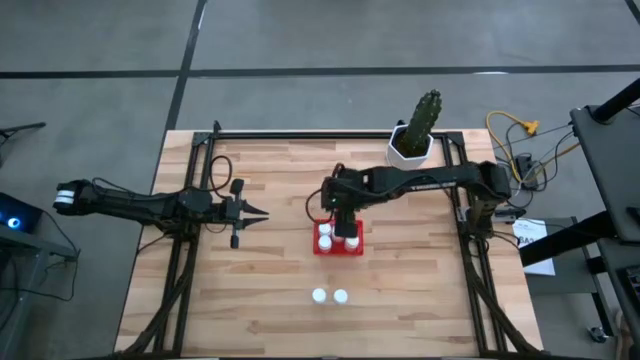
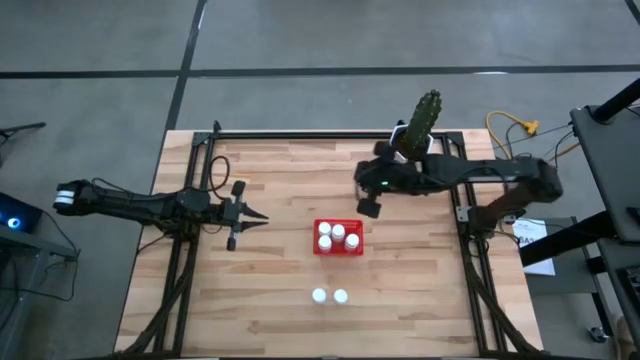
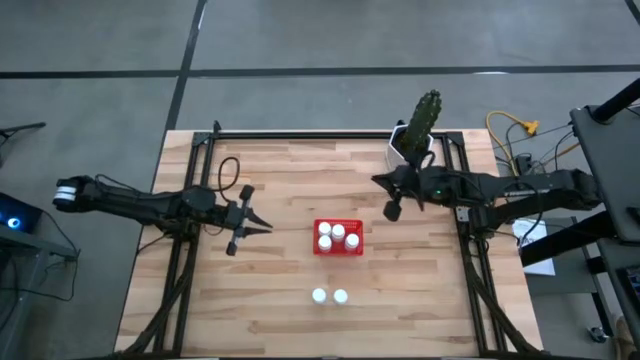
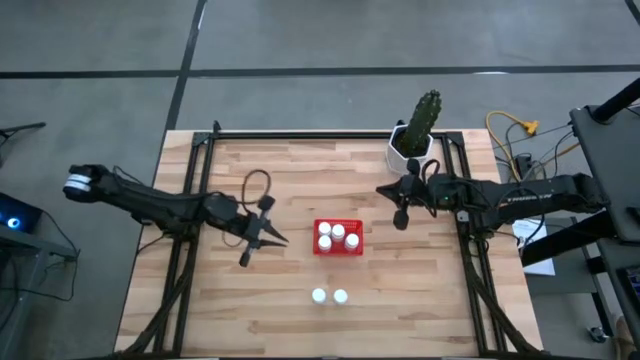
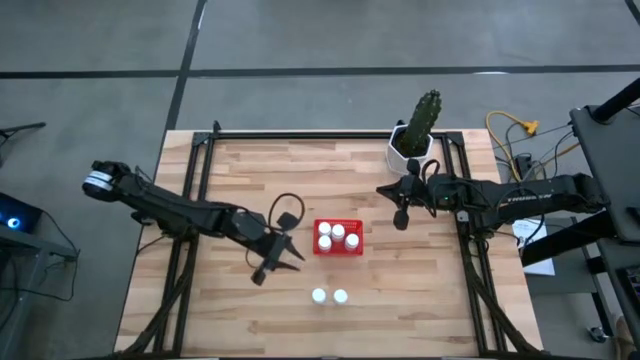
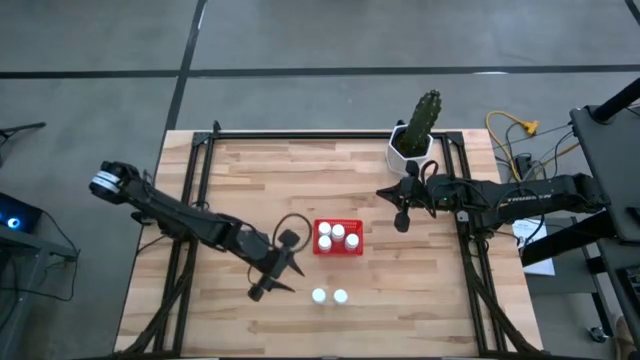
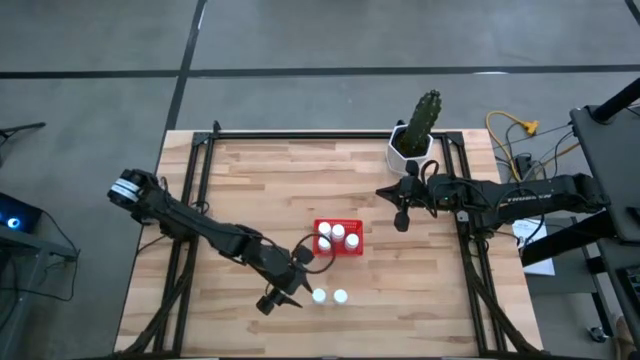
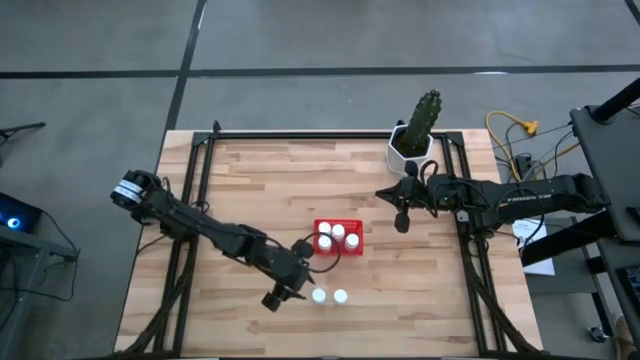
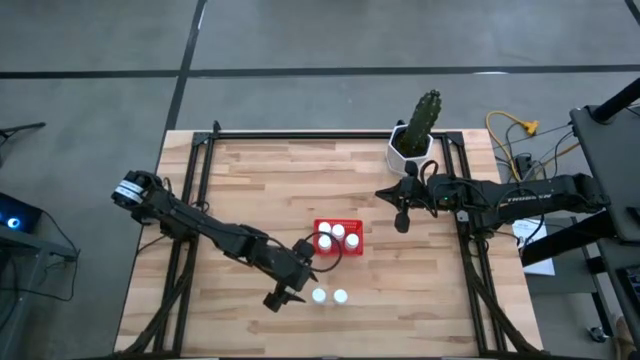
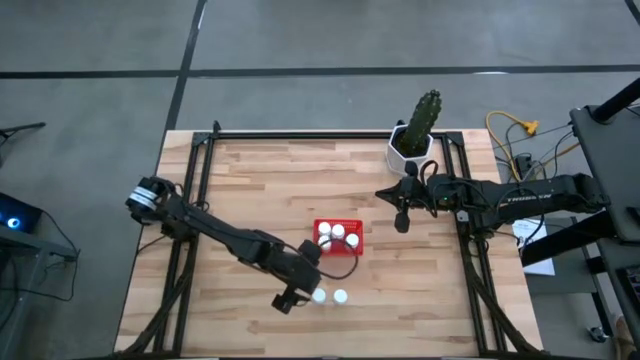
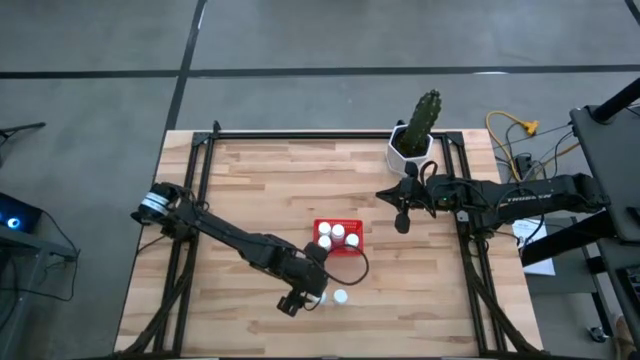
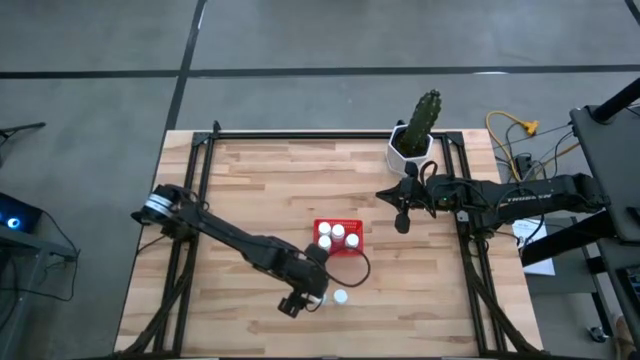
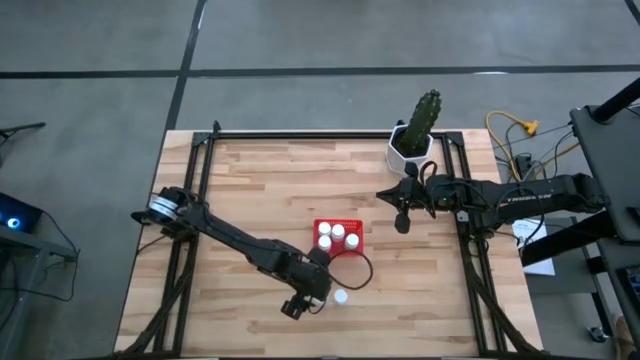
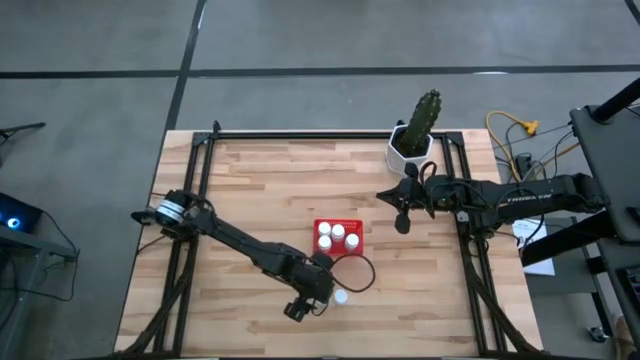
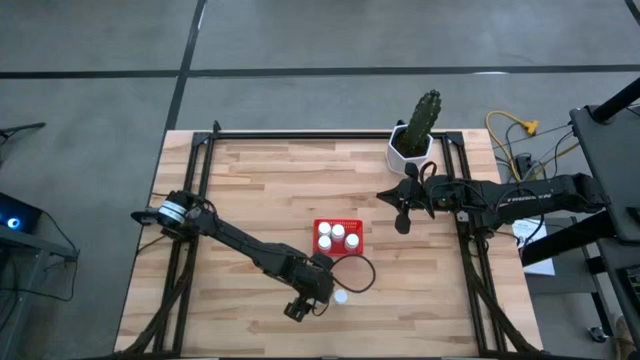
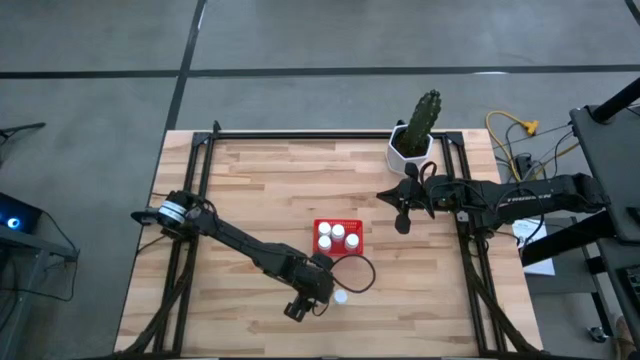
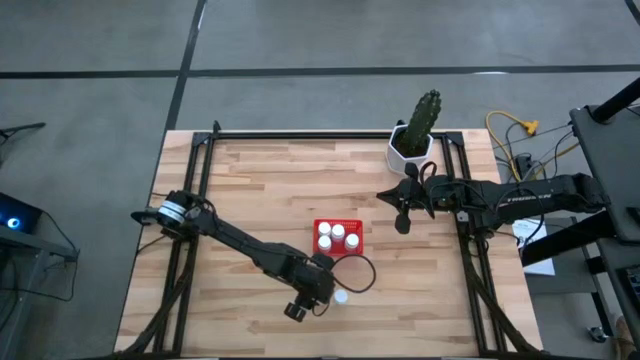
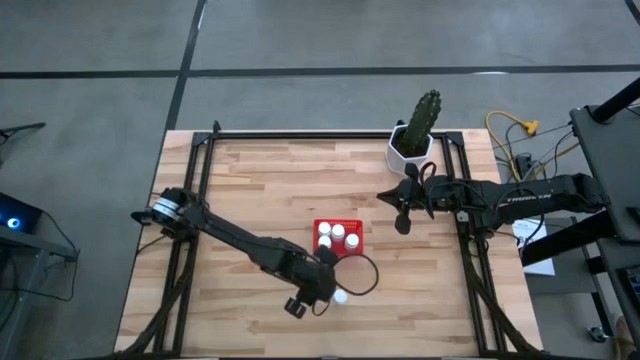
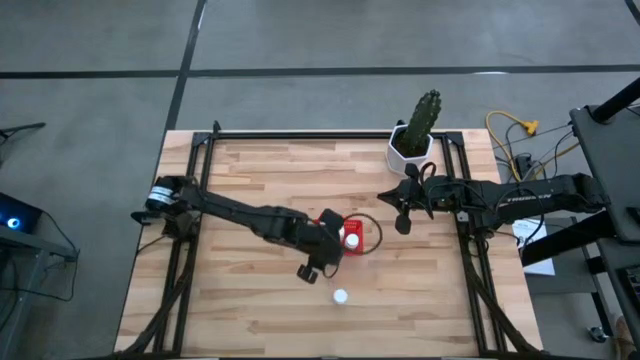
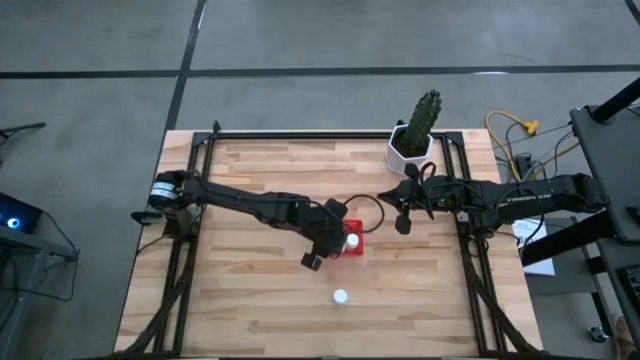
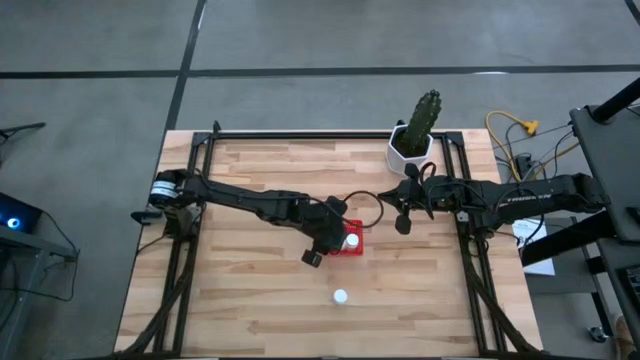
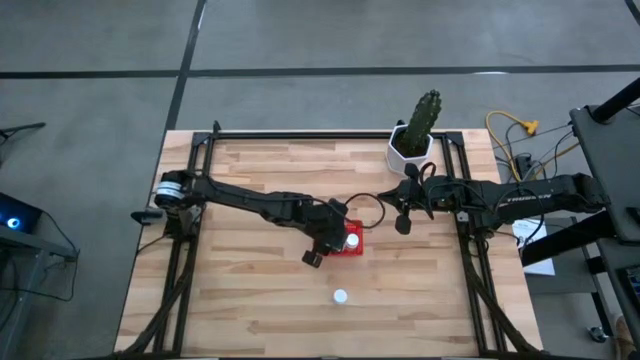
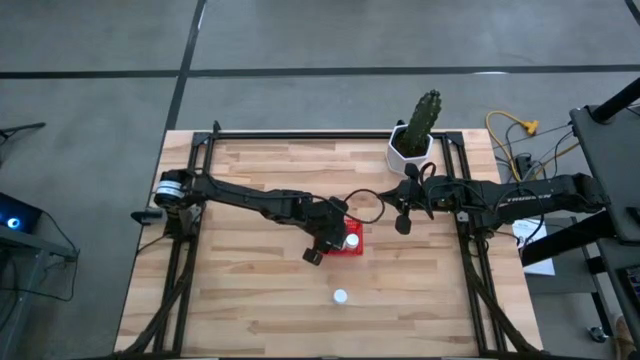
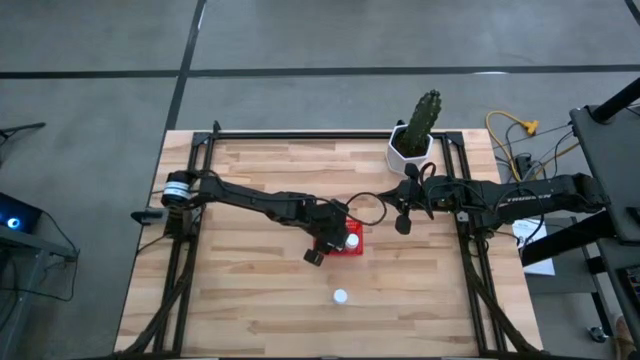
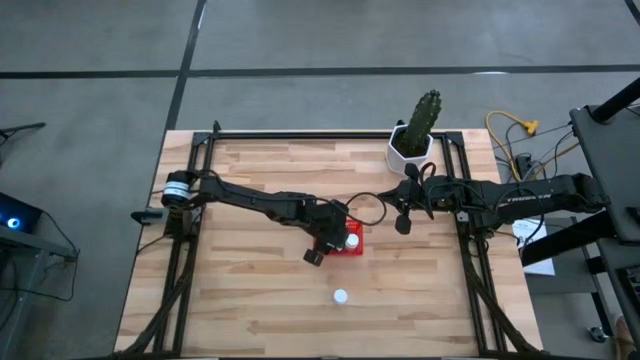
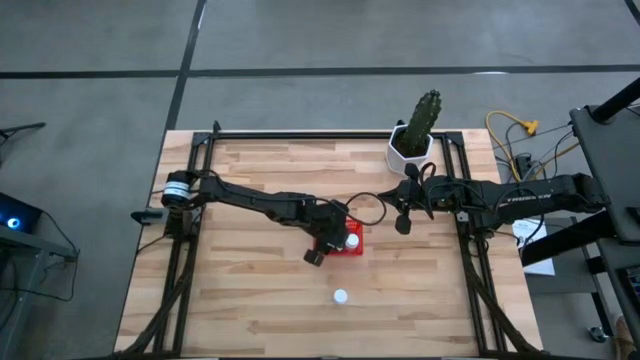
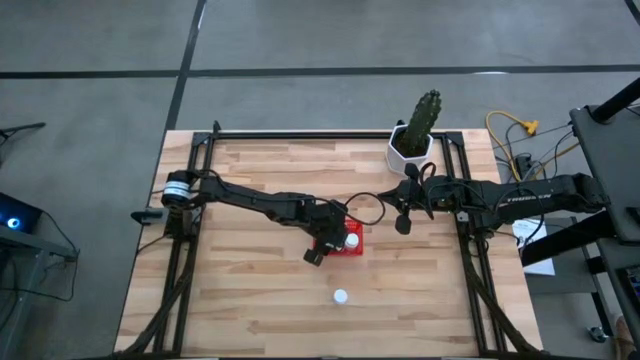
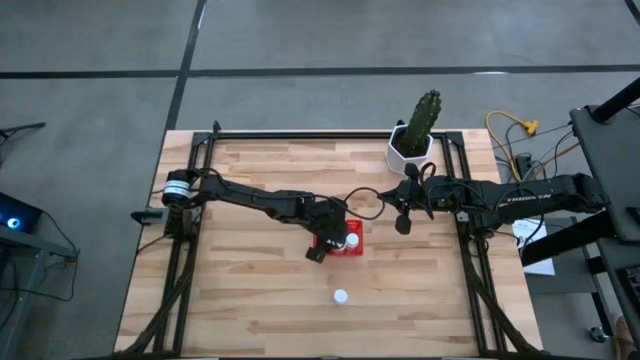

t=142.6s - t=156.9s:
Task: Pick and place pill bottles into a basket
Put the white pill bottle into the red basket

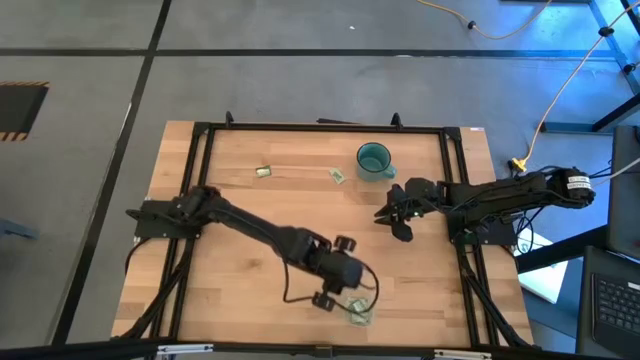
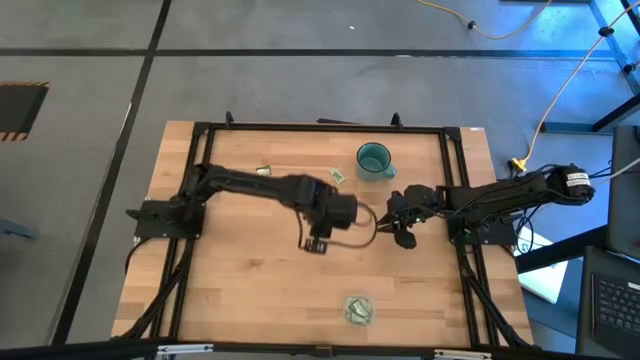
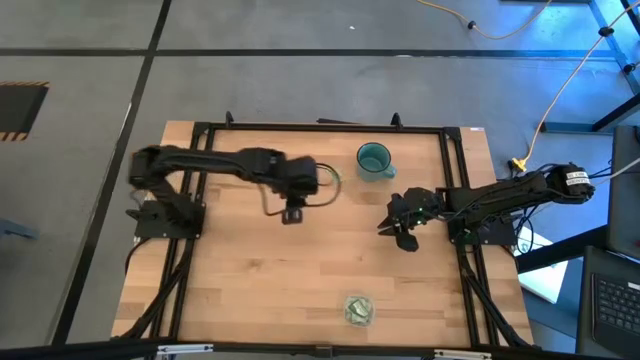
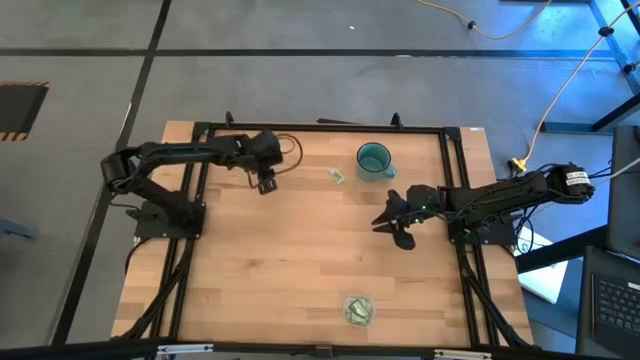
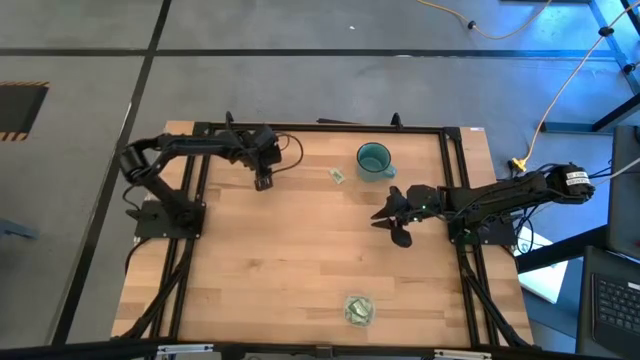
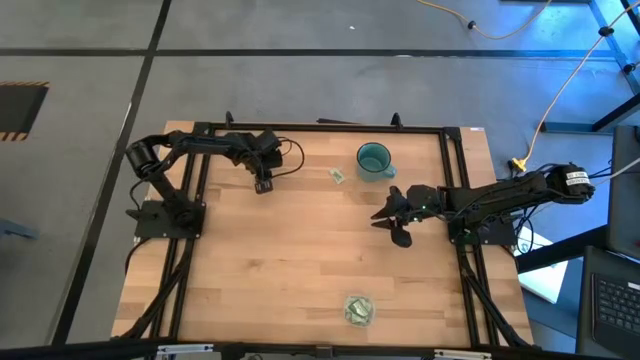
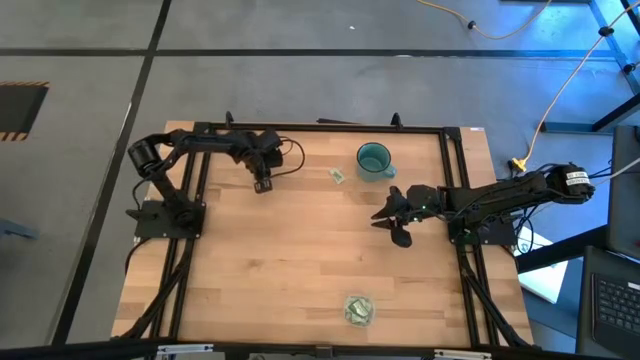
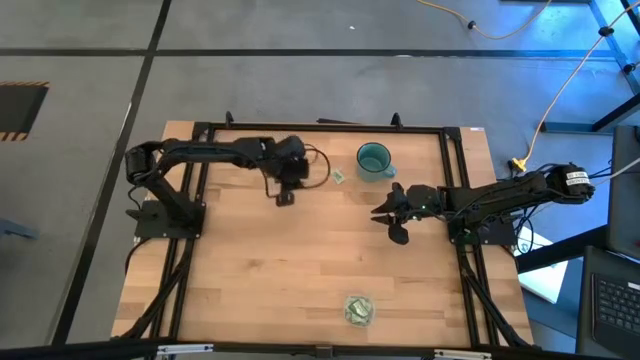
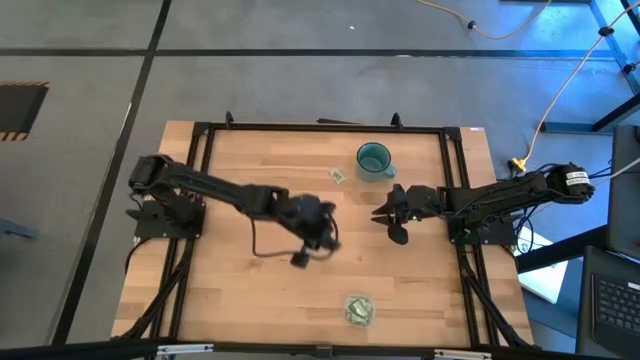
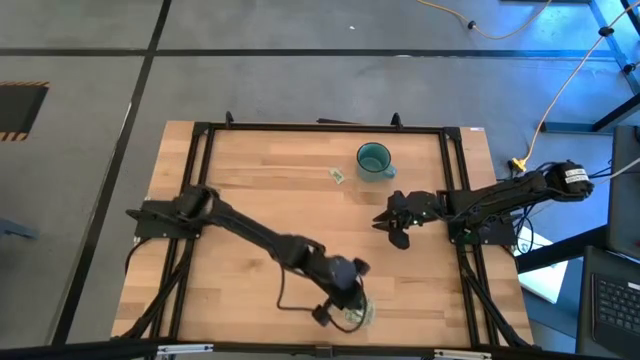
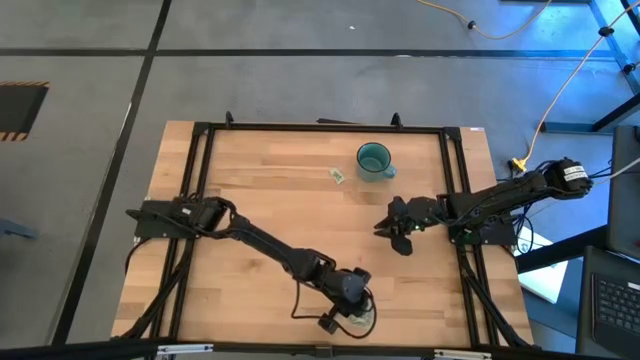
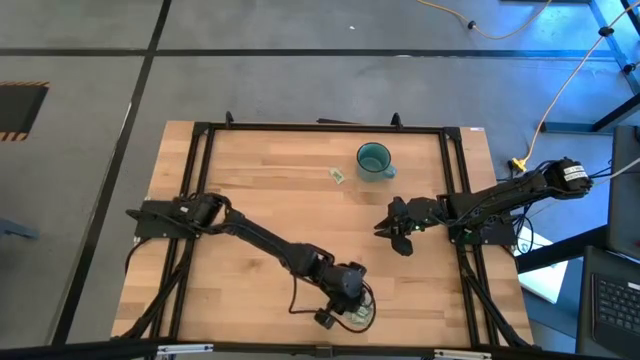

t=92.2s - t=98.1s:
Task: Pick and place items into bin
Put the green truvia packet into the transparent bin
